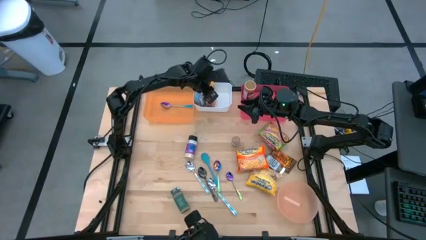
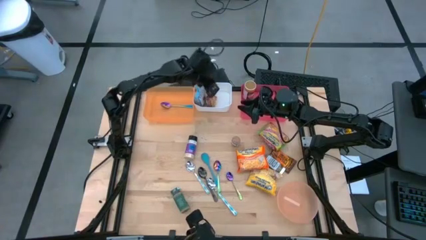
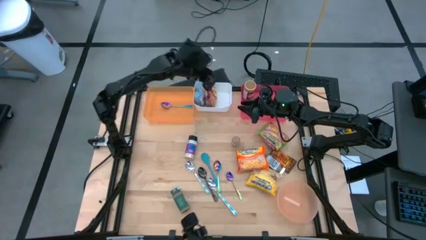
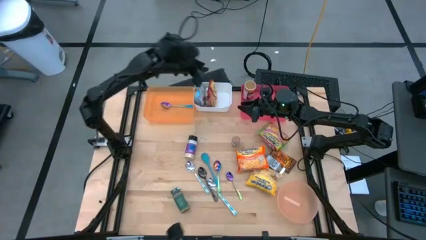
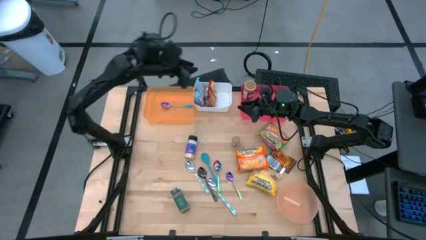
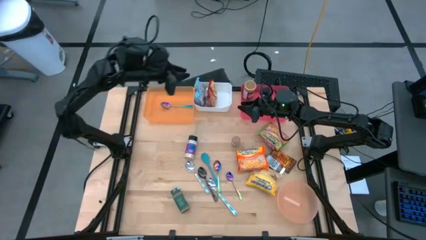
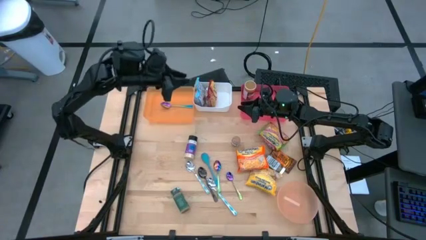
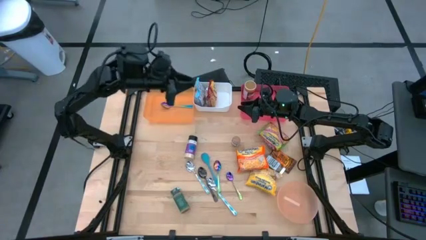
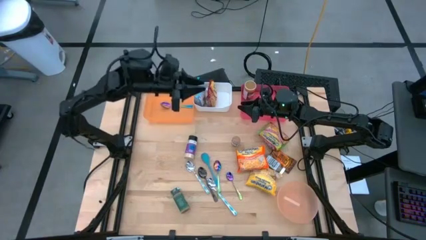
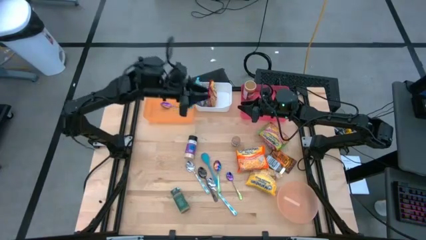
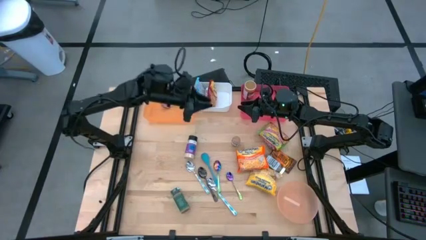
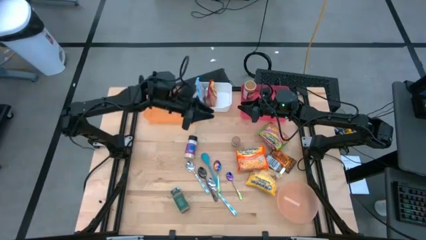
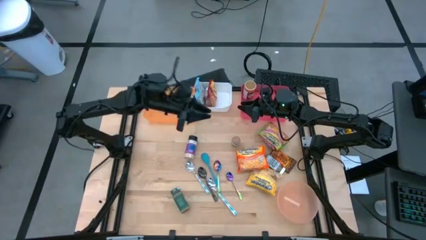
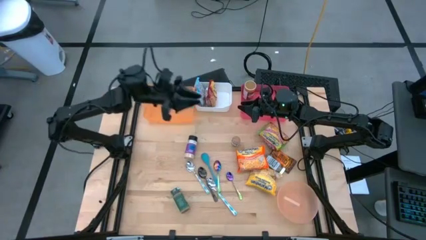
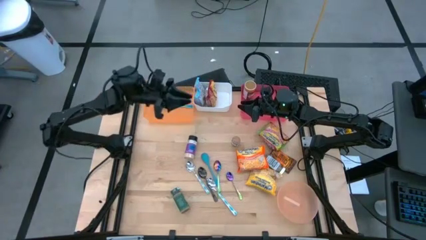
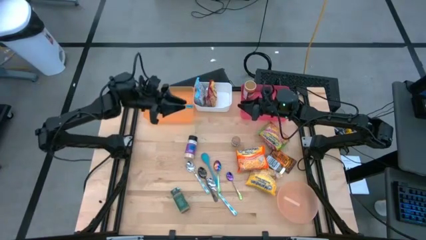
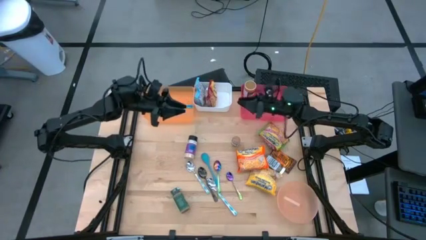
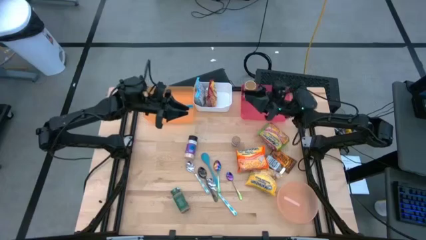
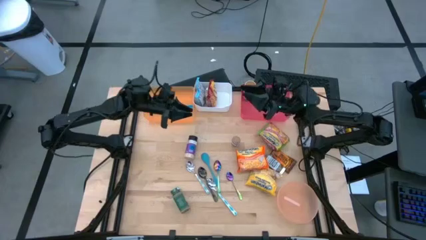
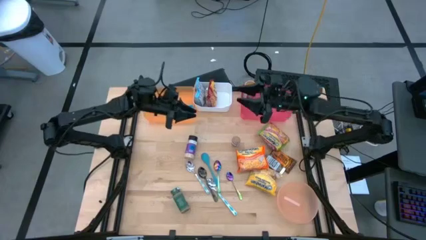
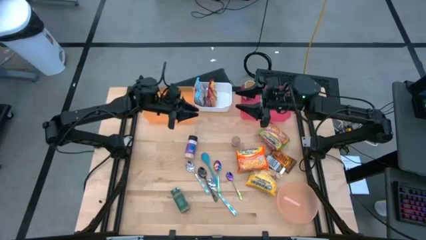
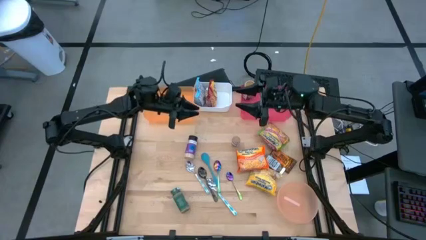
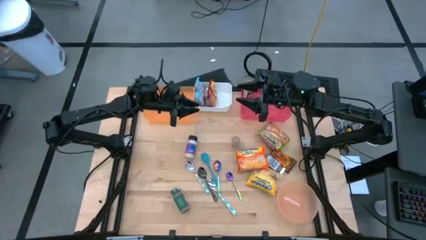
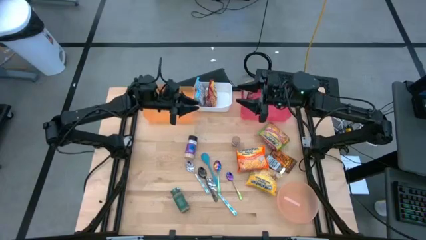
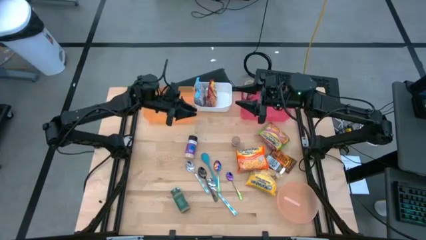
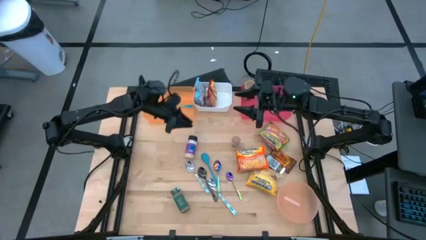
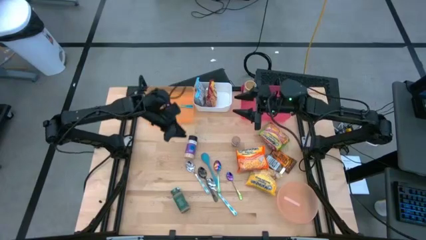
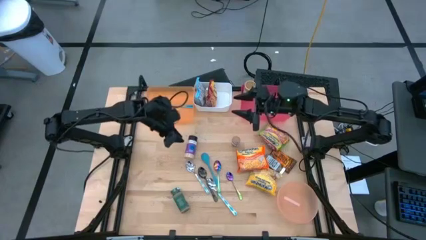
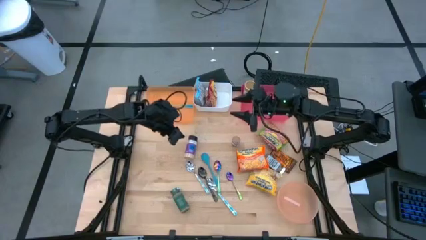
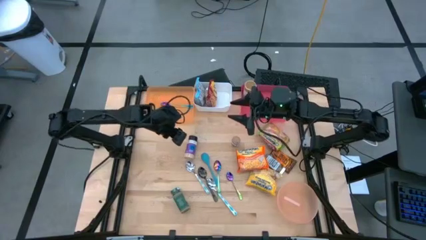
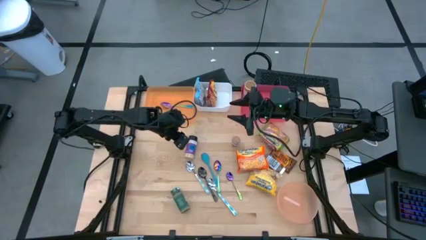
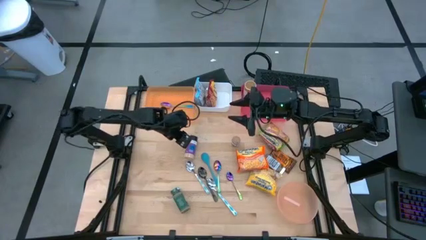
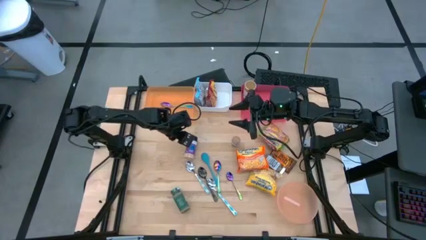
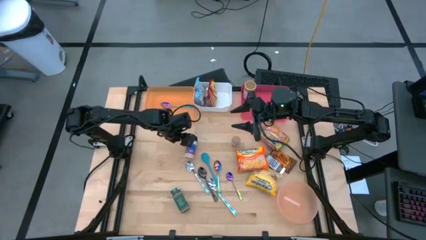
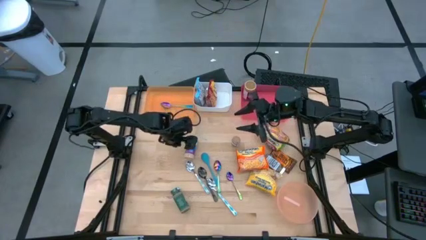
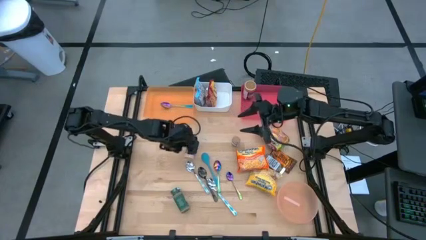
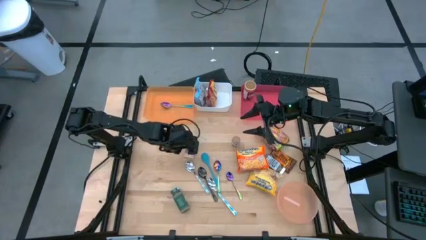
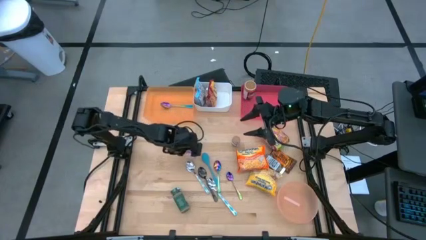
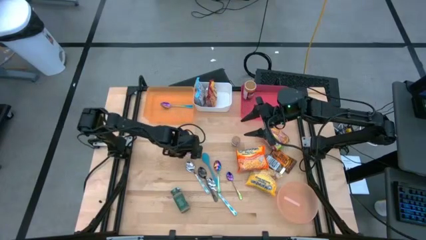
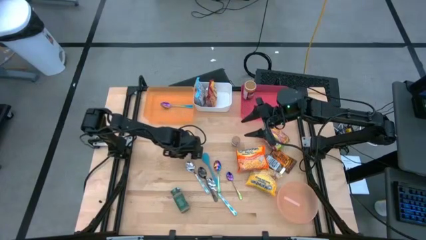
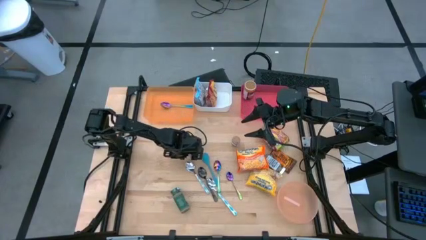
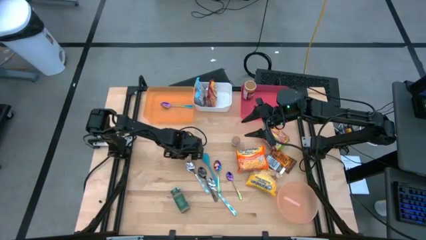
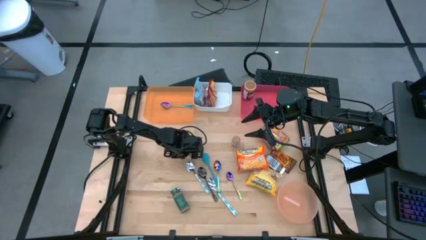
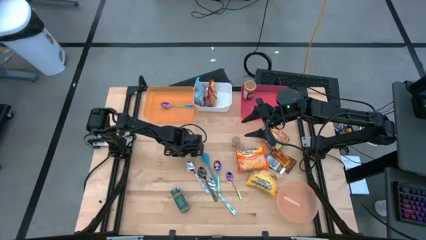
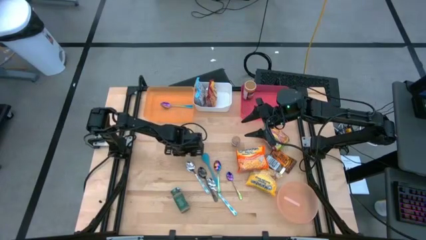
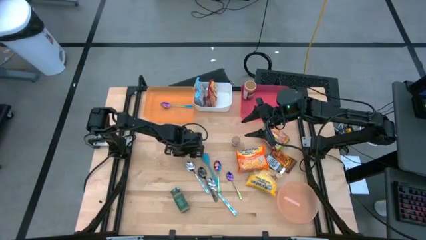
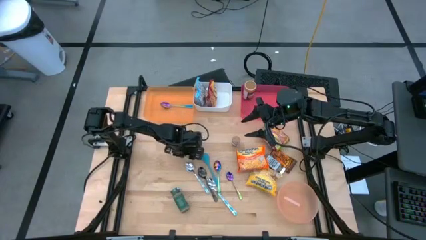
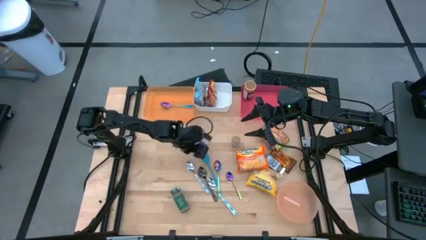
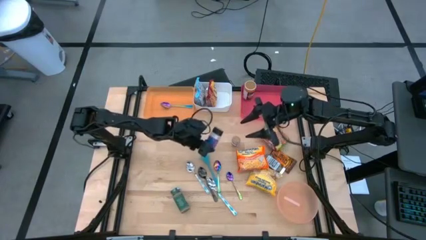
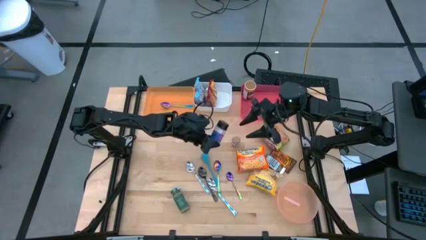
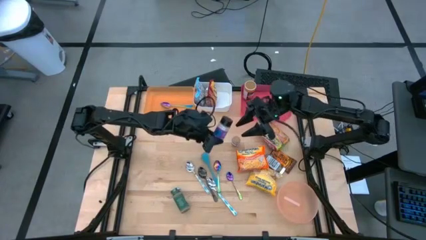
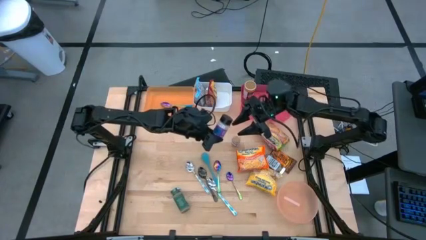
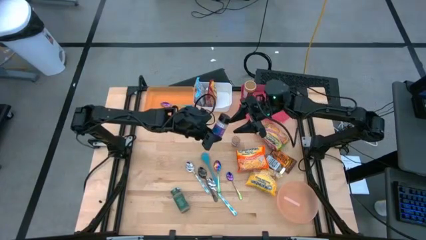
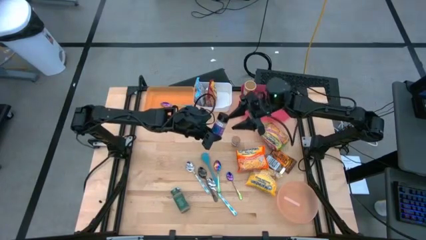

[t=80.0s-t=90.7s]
Task: Pick & Place Food Item
Put the purple spice bottle into the red bin
